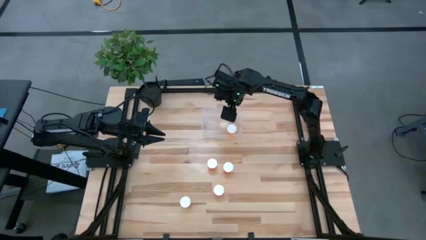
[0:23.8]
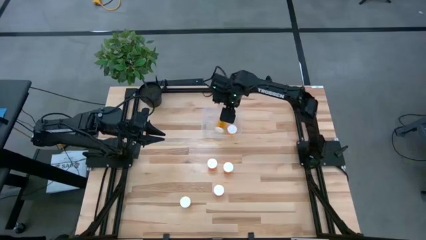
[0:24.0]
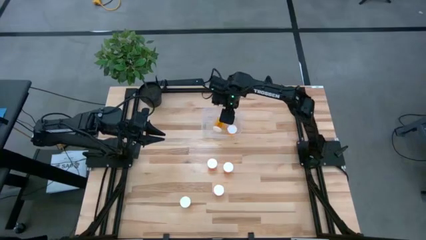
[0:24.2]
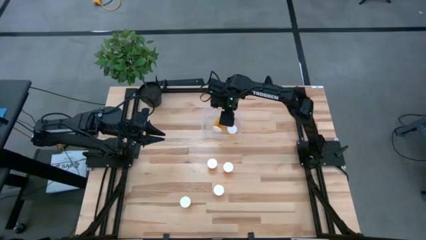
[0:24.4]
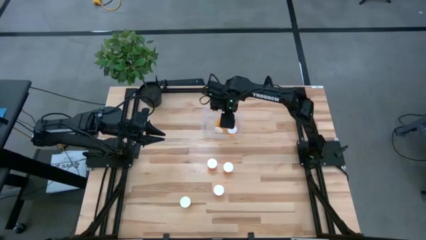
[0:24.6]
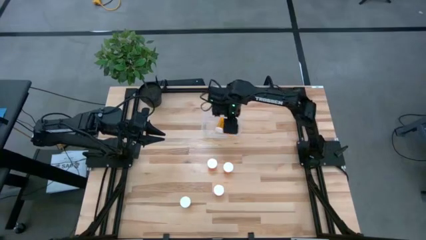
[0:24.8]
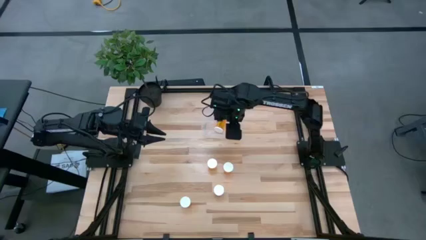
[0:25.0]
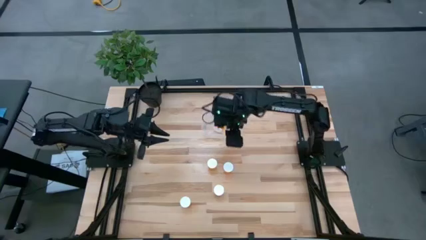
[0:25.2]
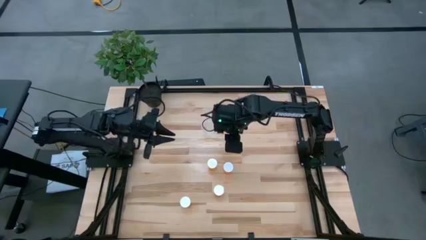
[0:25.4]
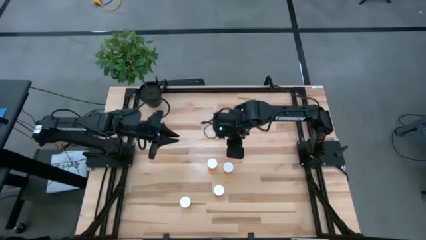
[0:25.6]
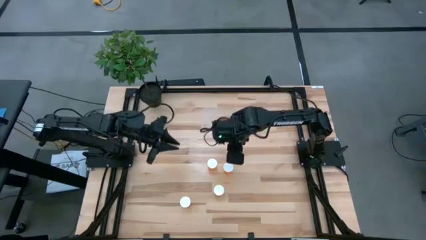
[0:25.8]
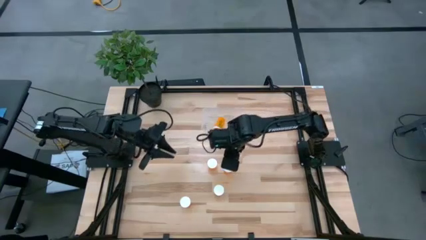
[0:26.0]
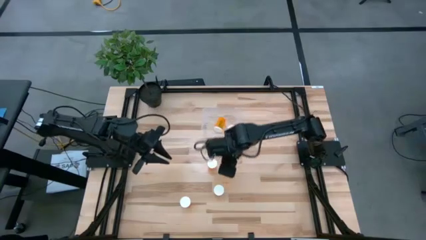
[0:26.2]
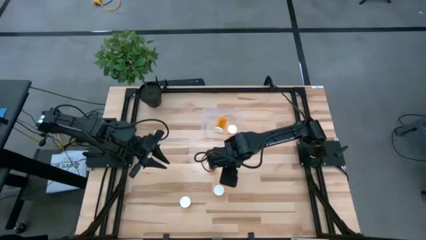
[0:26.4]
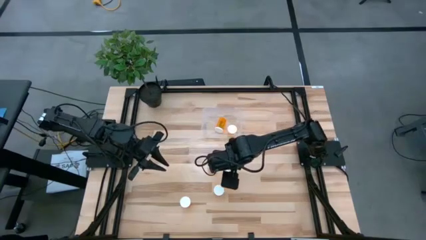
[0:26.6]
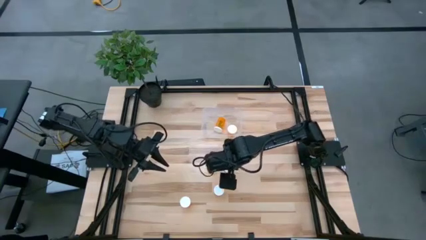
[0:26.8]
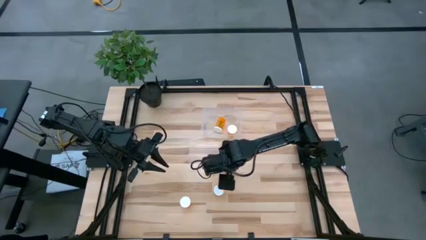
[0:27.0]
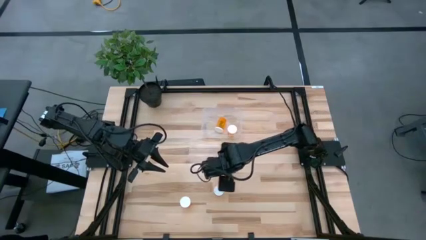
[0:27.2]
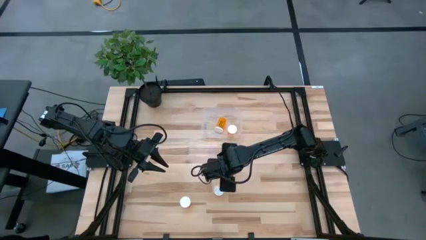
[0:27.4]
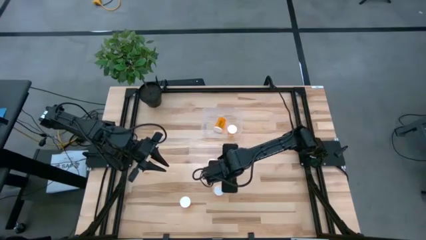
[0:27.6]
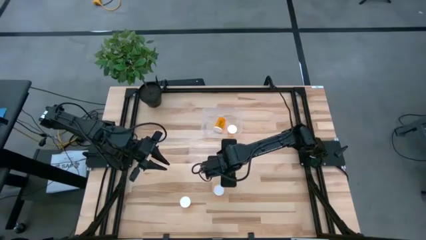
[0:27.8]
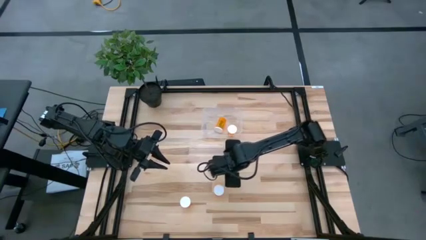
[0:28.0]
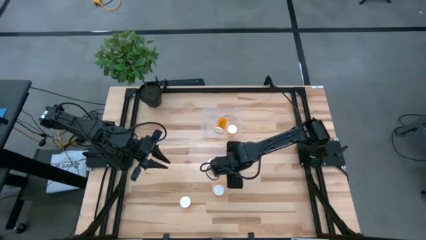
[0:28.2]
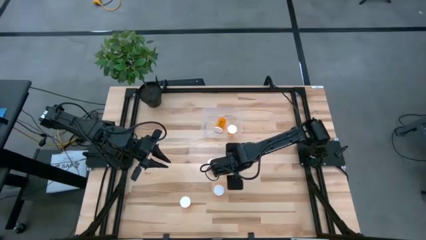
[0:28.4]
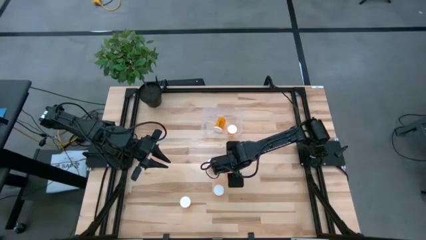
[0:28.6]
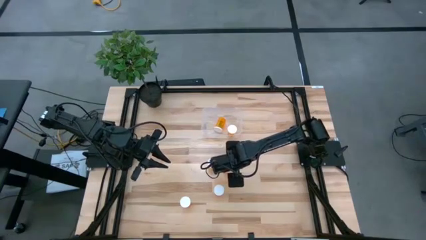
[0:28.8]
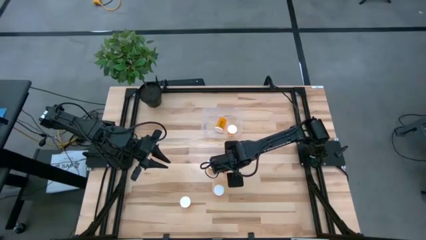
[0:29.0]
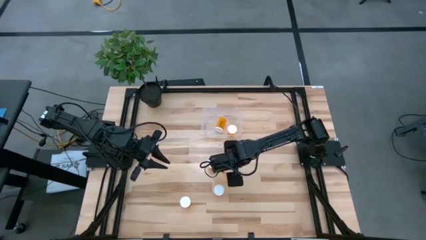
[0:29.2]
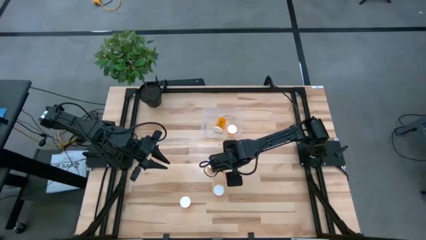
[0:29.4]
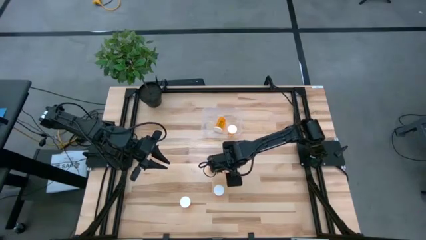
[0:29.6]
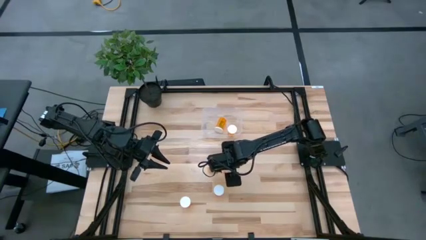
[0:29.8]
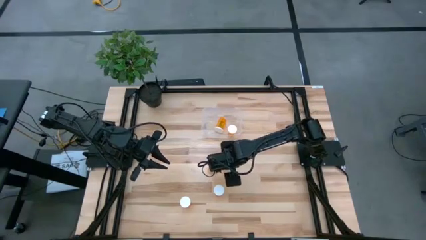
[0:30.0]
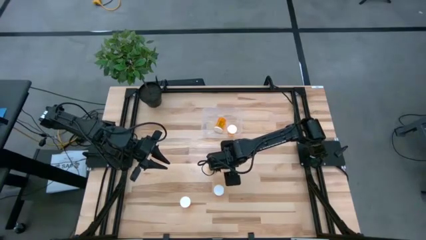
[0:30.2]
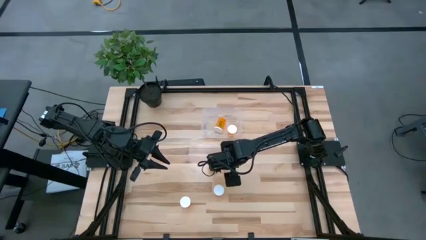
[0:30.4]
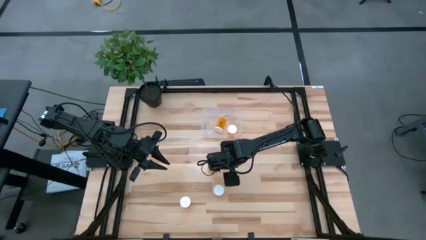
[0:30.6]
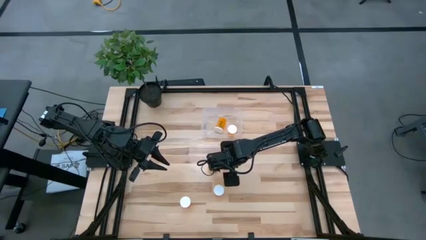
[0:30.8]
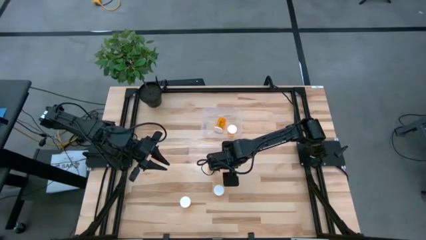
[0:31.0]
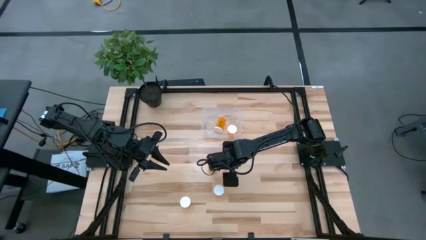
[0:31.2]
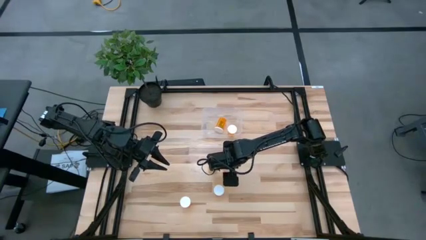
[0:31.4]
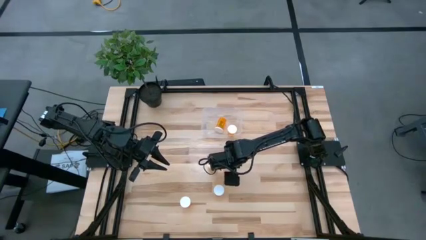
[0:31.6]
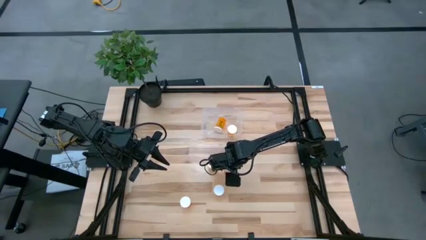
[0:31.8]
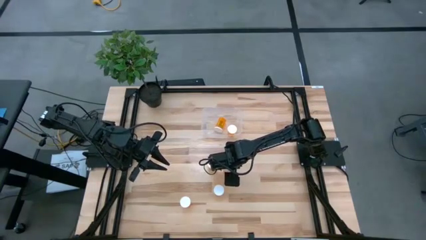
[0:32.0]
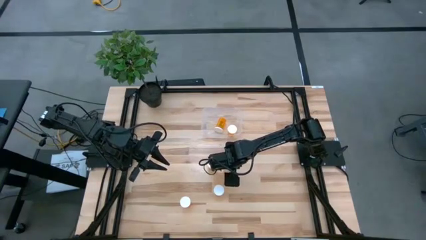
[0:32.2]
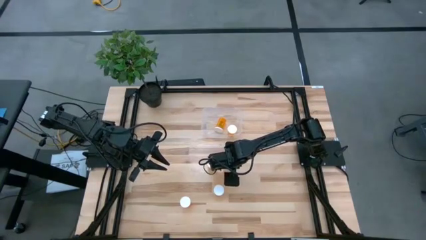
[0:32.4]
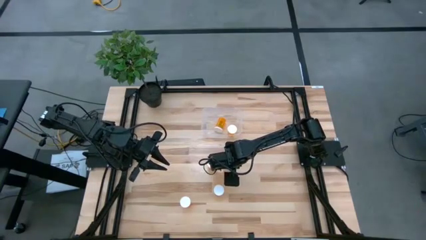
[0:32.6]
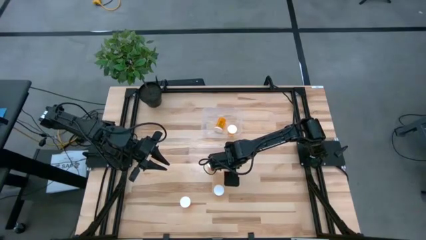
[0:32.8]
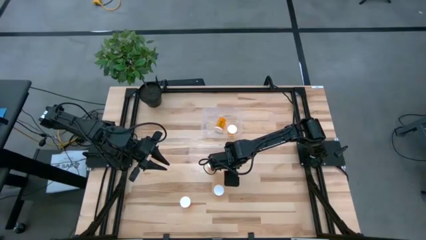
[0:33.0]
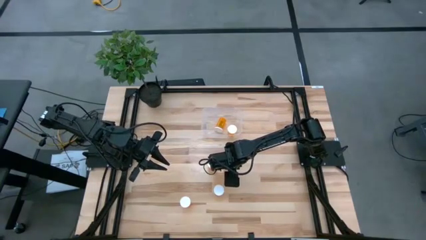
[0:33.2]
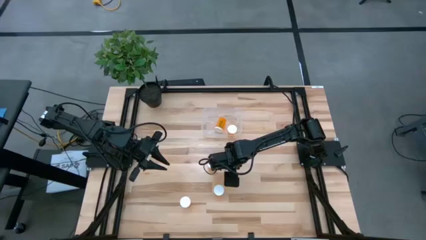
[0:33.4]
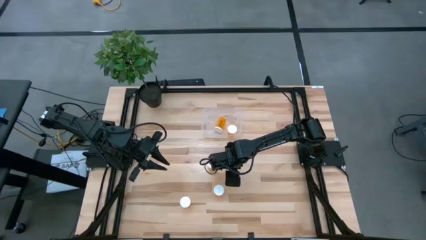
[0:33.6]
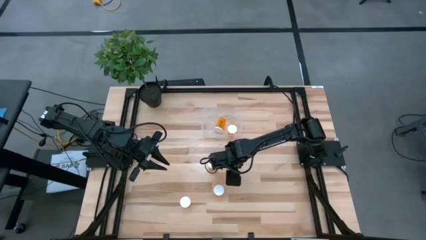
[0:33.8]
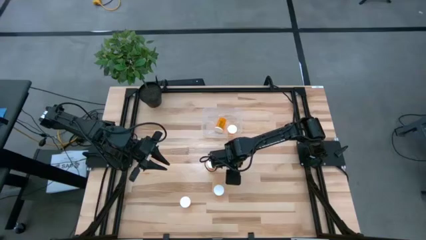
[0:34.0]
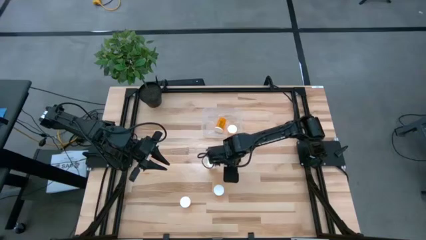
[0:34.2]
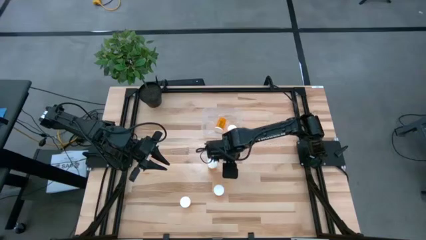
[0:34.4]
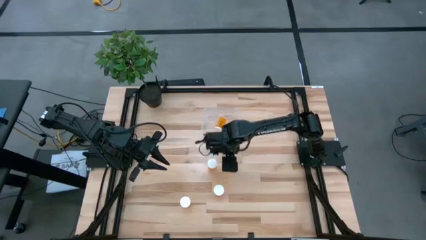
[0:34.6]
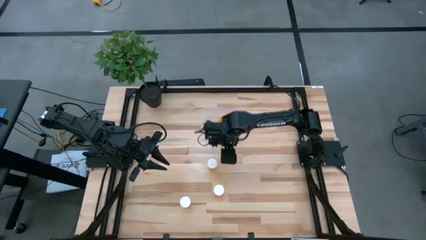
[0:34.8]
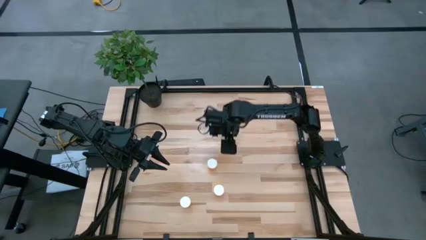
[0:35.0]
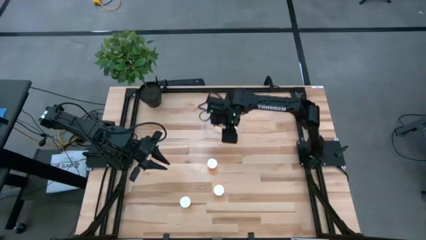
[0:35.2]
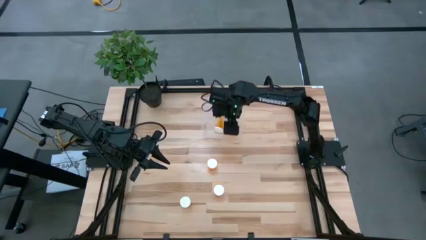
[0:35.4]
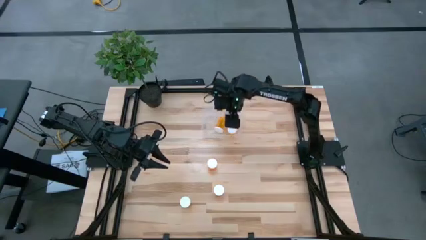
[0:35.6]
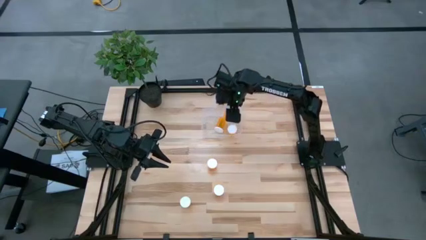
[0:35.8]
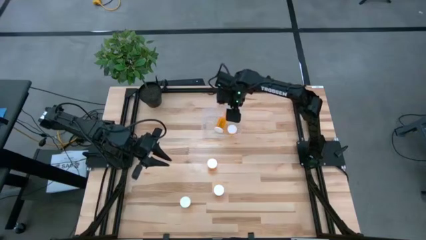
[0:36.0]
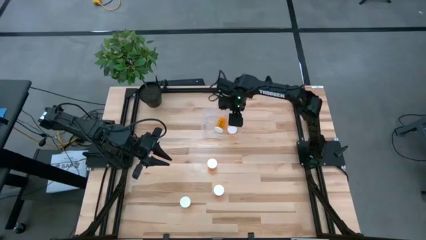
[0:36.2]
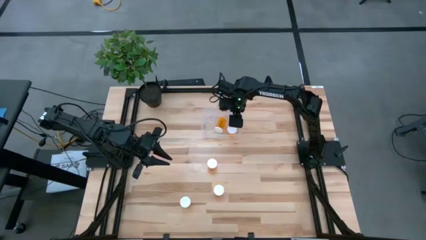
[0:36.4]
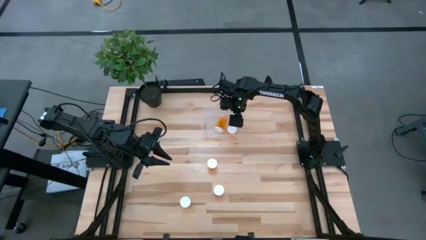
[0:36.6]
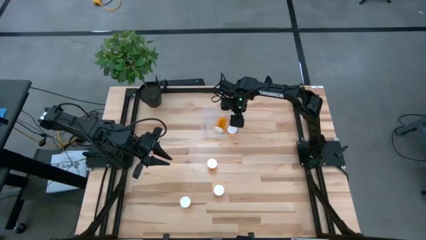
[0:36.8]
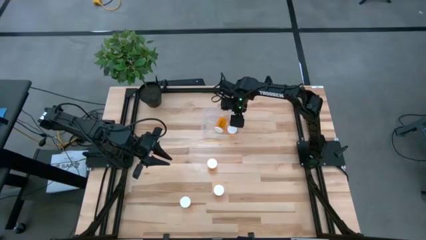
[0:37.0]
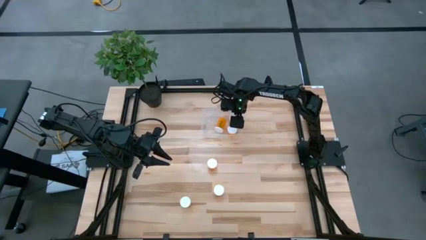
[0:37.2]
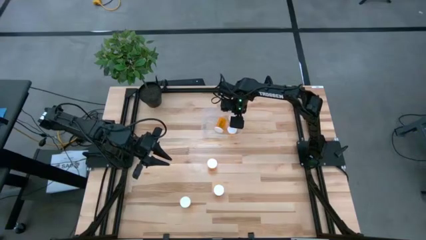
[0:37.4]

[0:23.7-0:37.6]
Task: Pick and place pill bottles into a basket
Put the orange pill bottle into the transparent bin
